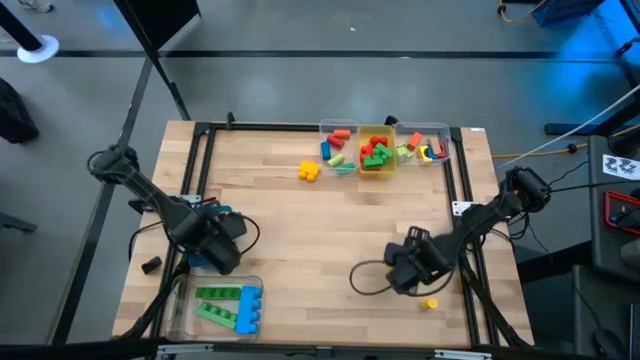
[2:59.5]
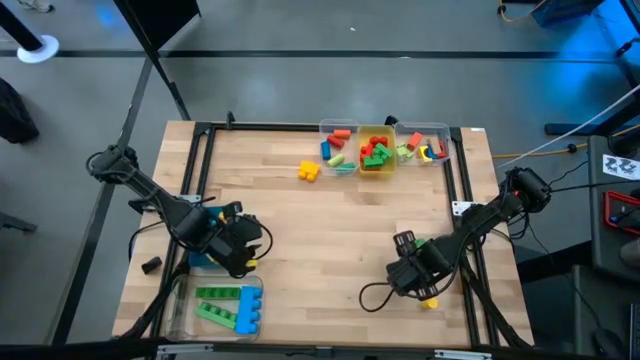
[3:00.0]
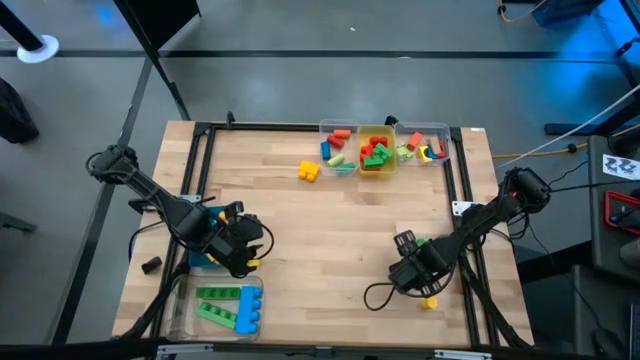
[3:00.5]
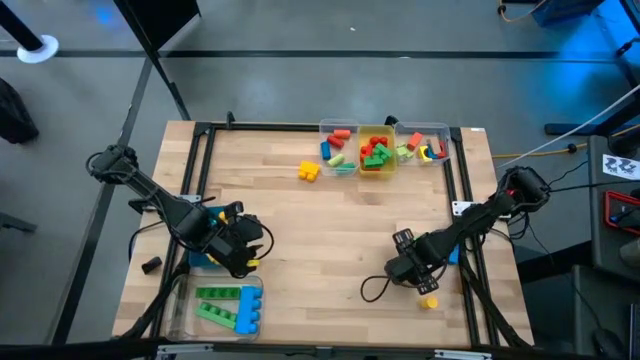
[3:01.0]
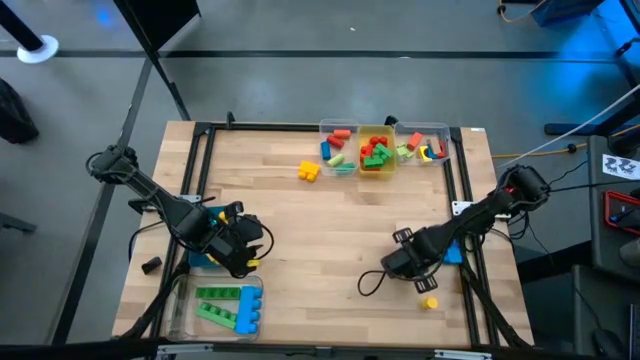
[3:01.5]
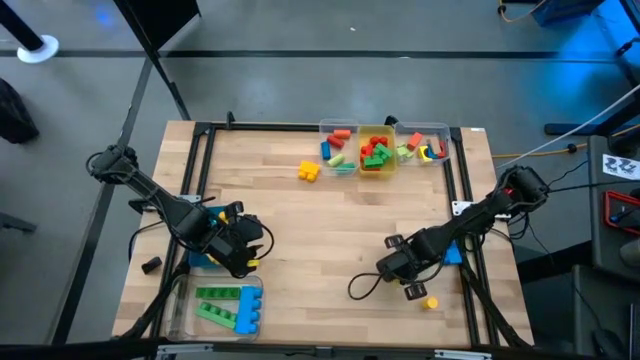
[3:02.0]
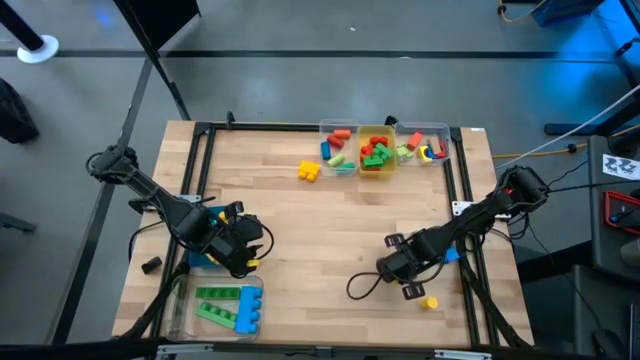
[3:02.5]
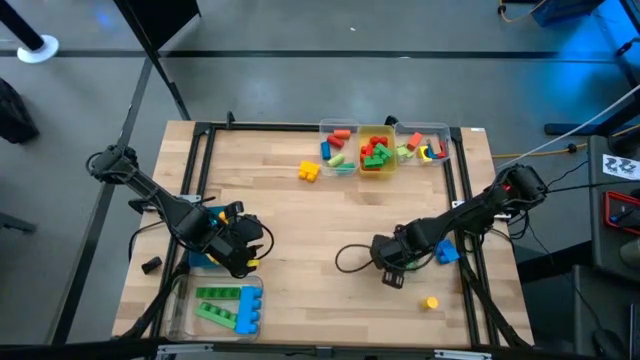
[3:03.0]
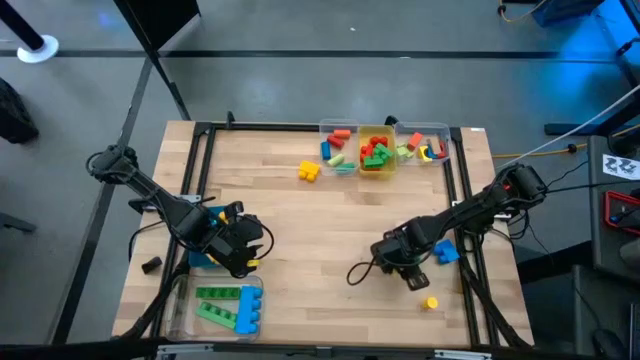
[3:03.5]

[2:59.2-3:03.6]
Task: Sort blocks by size
Put the green 4 stud game piece into the bottom transparent bin

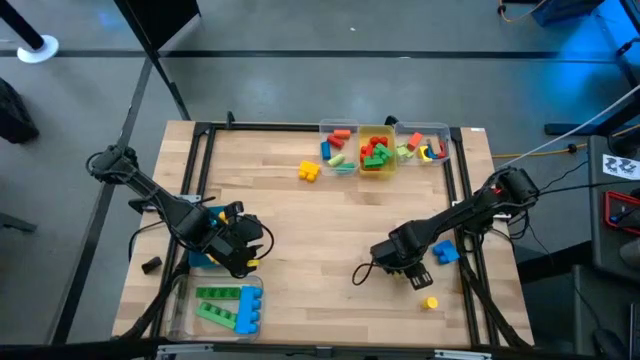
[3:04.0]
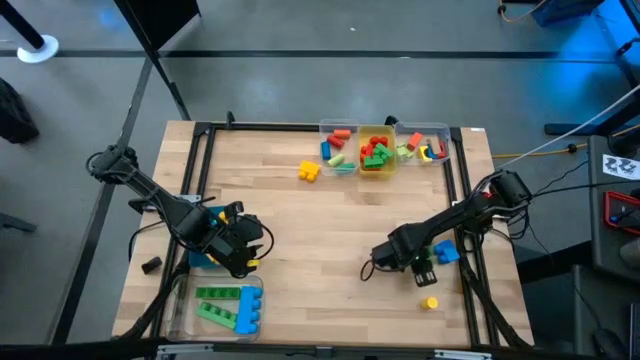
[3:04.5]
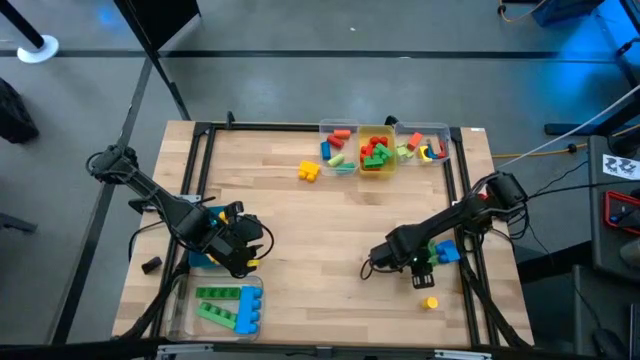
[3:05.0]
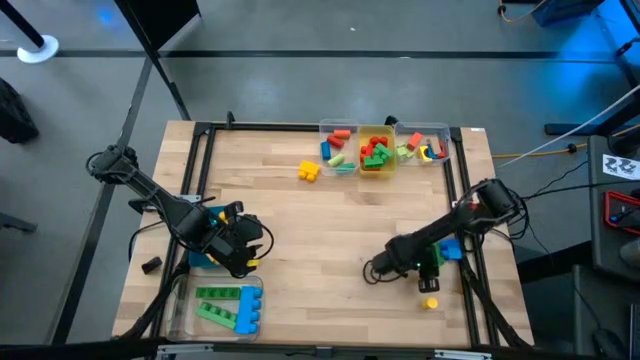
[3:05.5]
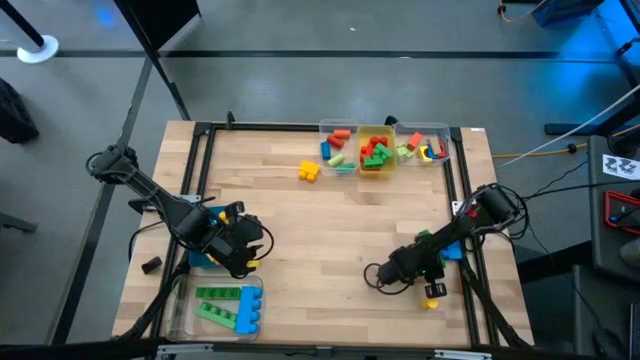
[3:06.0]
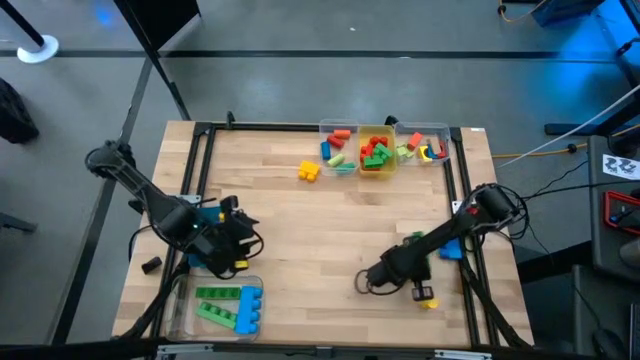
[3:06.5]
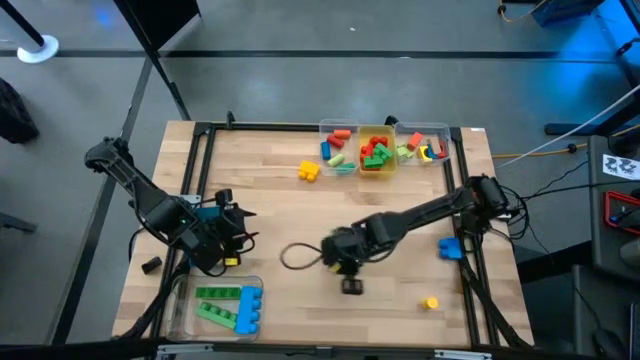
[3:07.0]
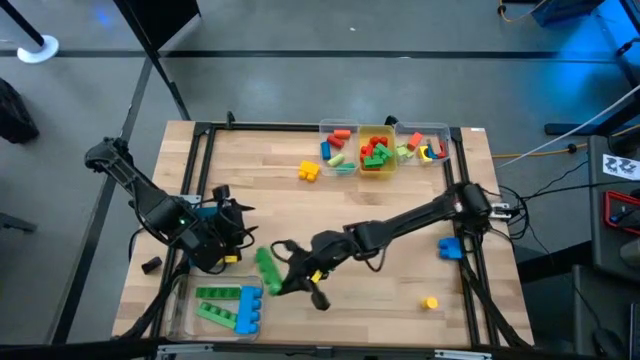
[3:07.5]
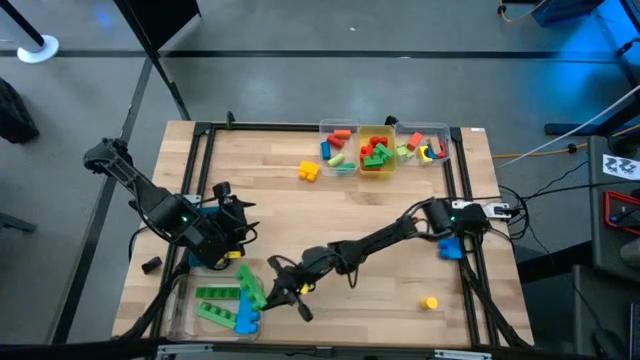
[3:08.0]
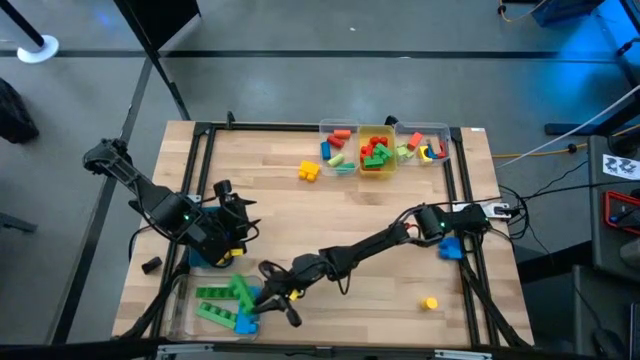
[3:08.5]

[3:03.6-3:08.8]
Put the green 4 stud game piece into the bottom transparent bin

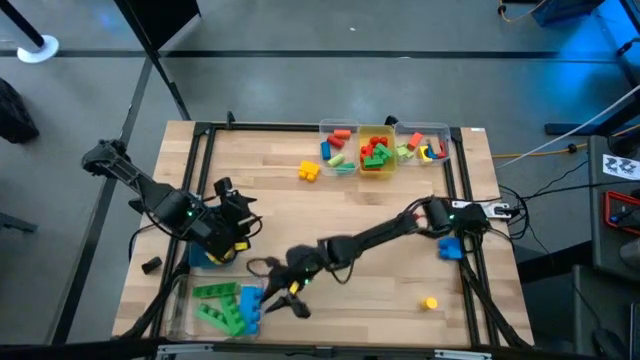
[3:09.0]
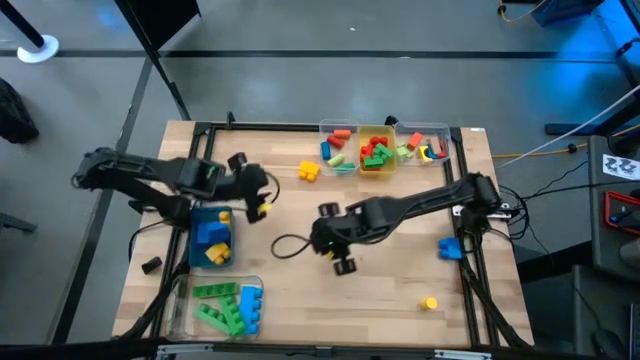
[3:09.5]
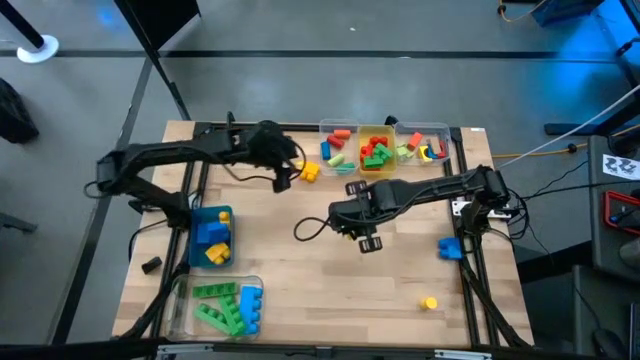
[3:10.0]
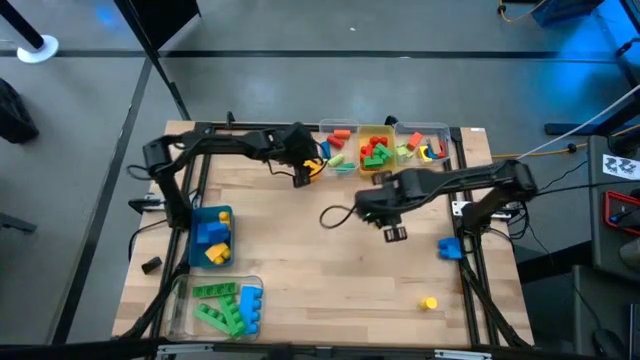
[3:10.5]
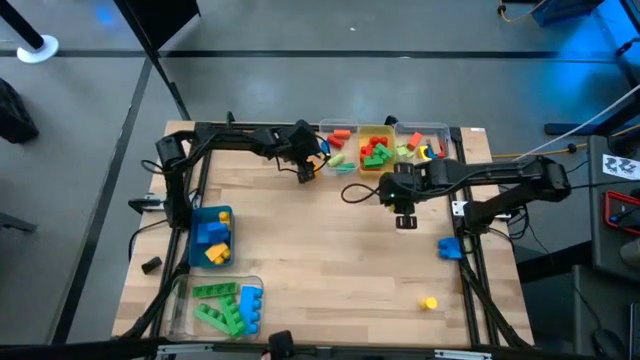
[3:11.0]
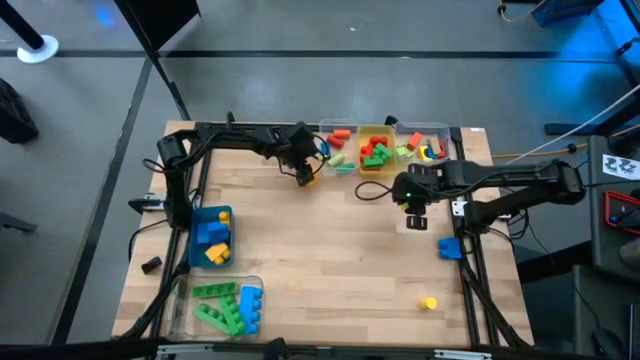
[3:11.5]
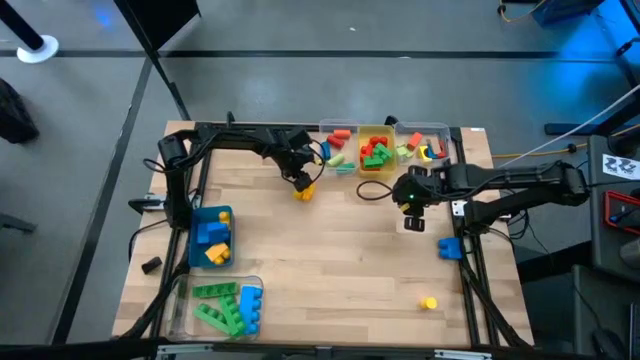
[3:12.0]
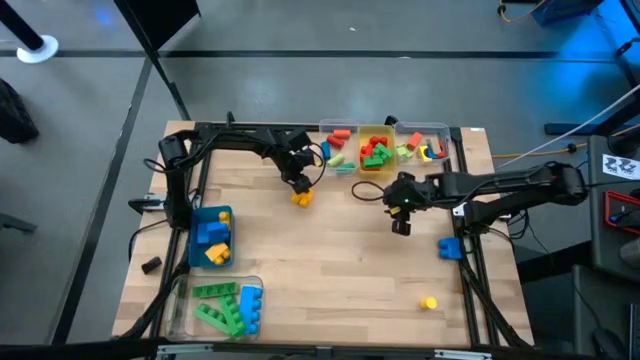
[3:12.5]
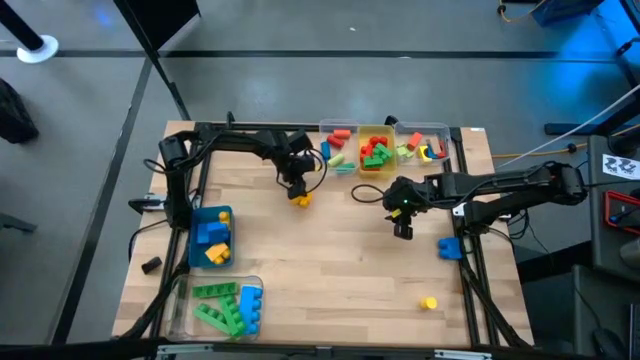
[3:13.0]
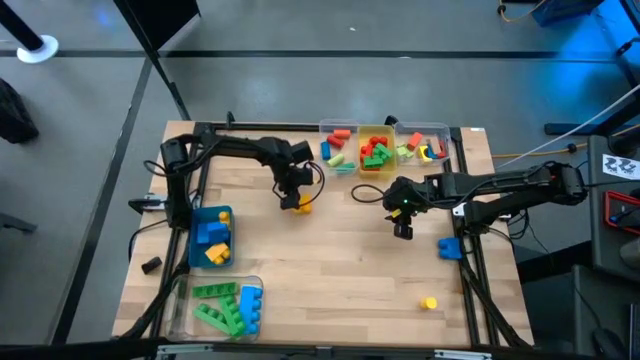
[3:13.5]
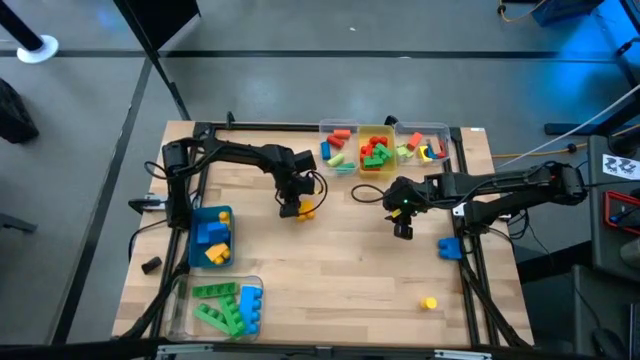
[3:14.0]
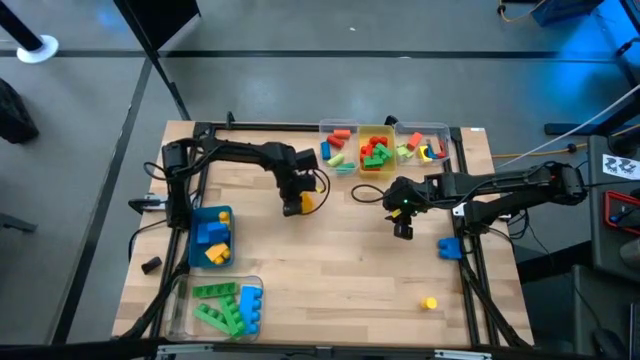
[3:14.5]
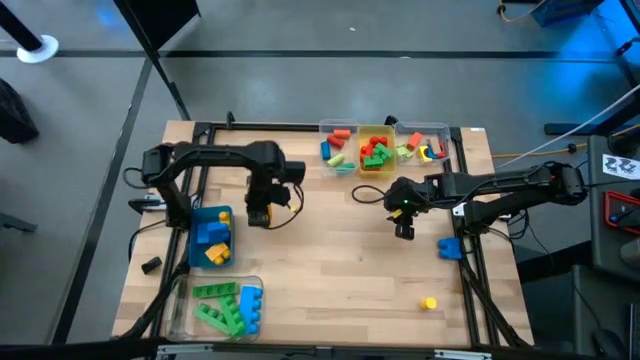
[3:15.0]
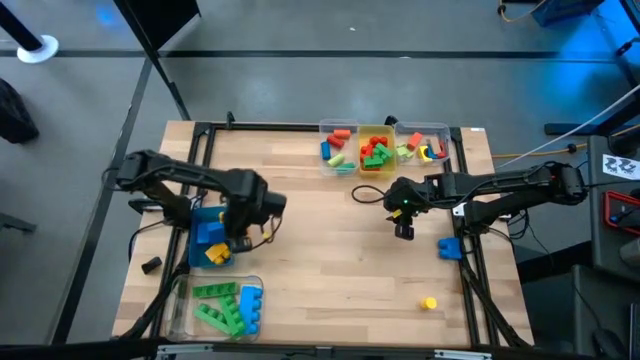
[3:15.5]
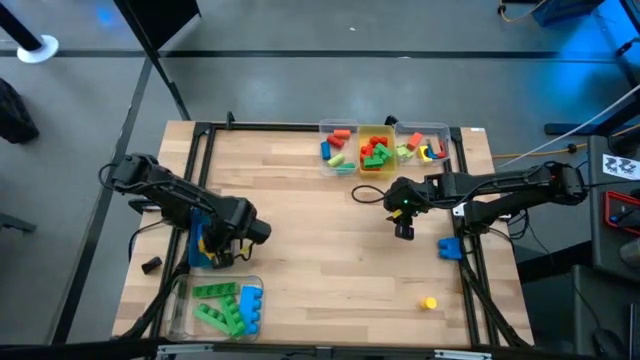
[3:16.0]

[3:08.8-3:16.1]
Put the yellow 2 stud game piece into the blue bin

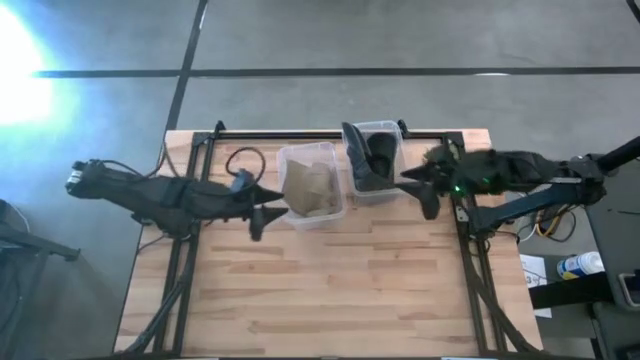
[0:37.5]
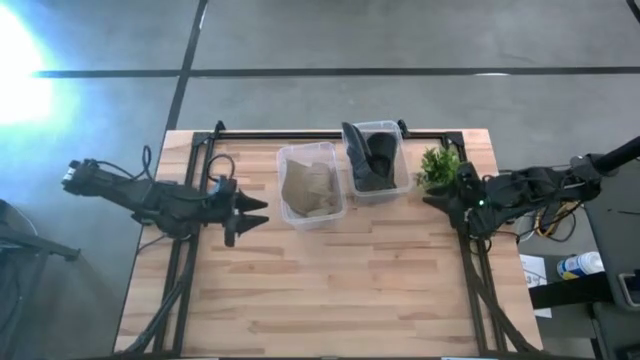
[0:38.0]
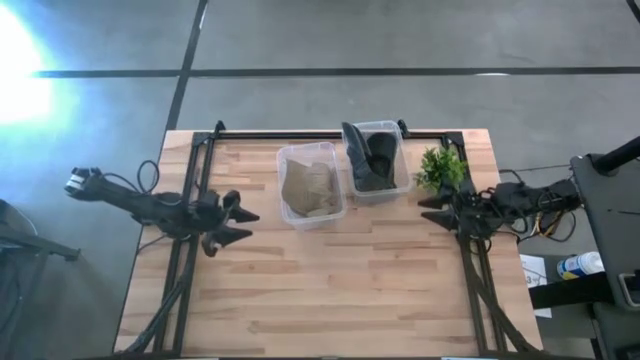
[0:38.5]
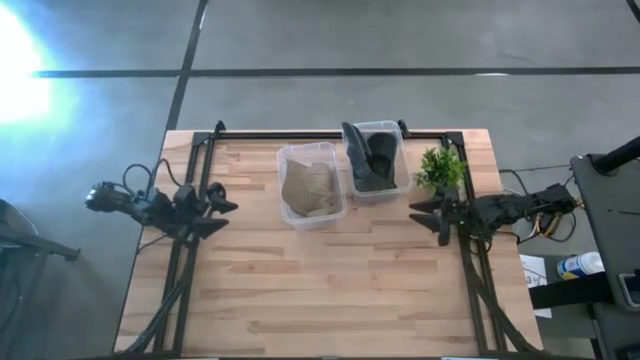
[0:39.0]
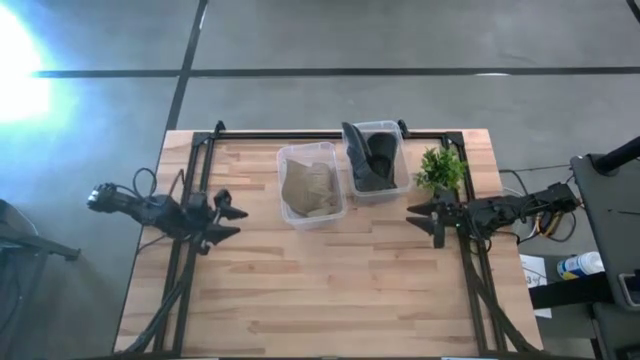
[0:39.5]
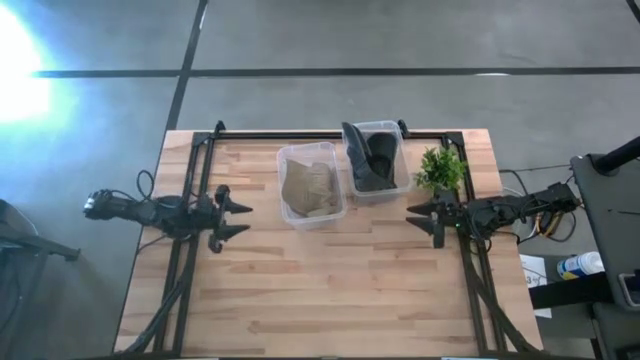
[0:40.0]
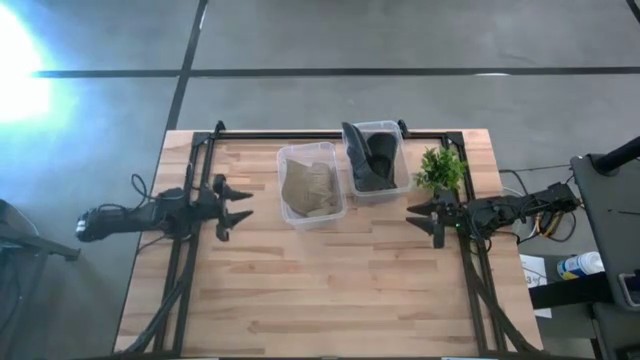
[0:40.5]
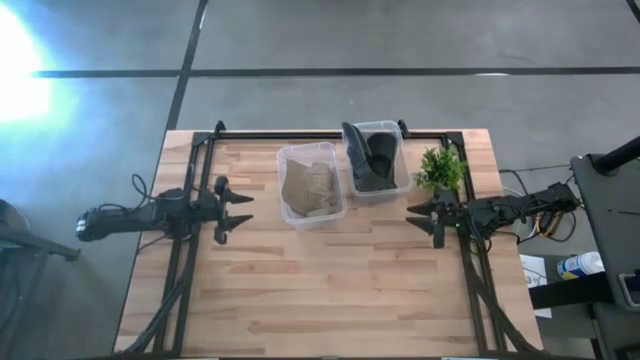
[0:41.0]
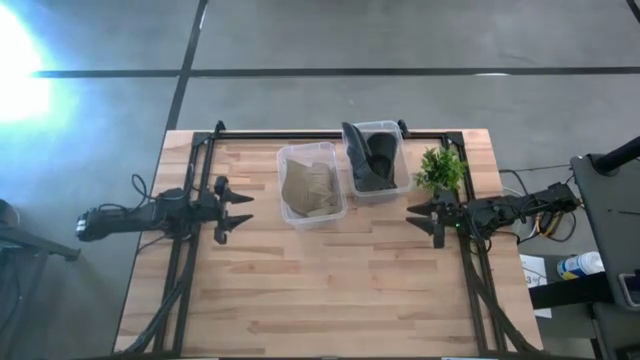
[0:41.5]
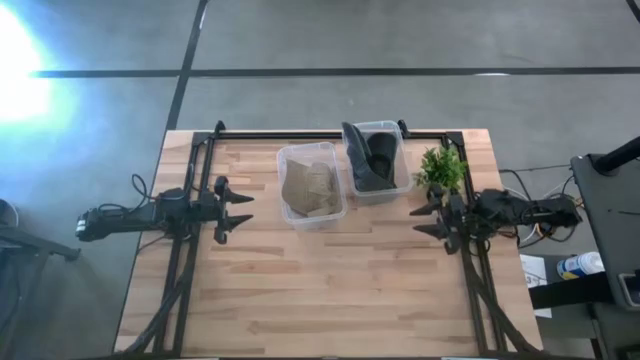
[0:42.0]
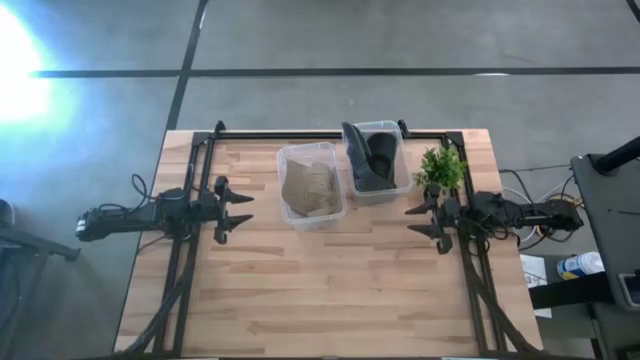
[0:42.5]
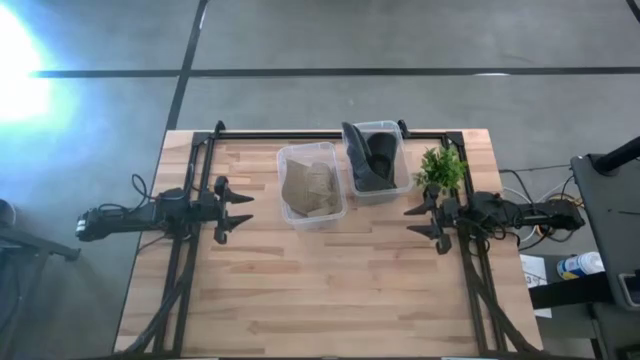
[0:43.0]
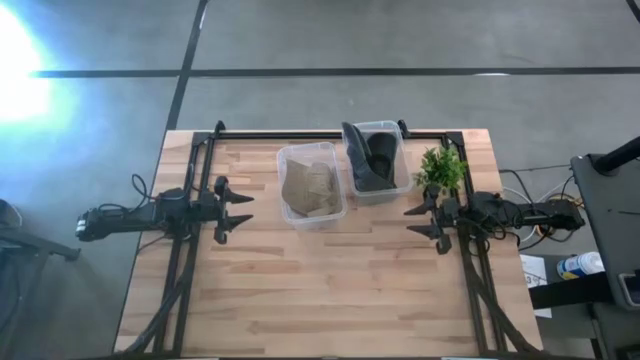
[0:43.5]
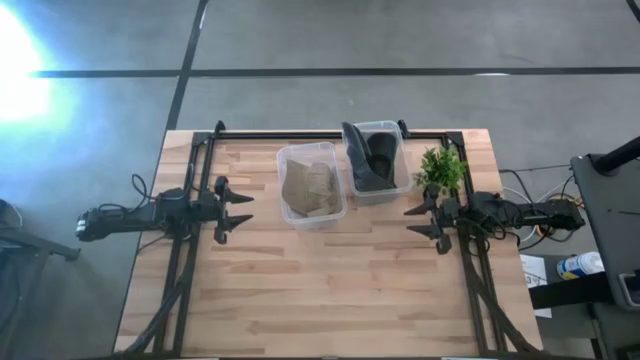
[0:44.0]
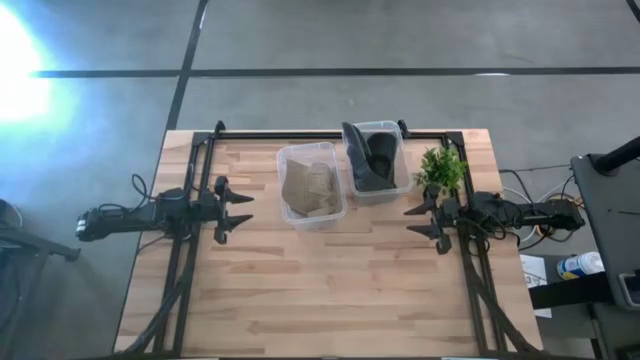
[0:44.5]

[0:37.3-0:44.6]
Task: Pick & Place hat
Return to home position
